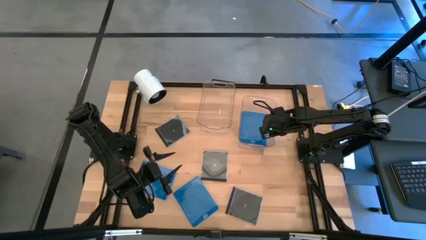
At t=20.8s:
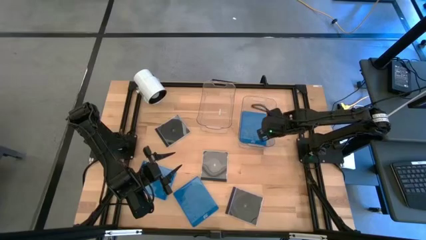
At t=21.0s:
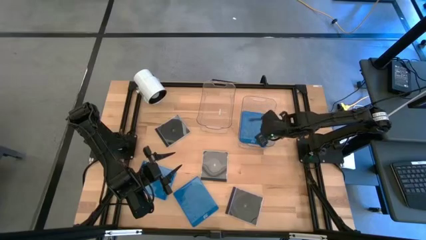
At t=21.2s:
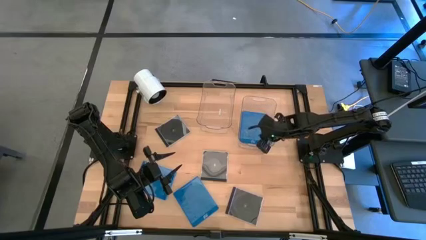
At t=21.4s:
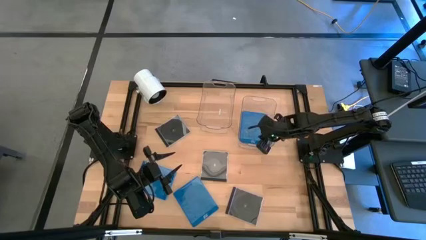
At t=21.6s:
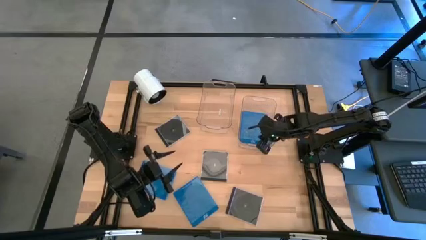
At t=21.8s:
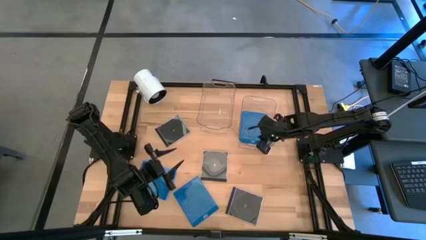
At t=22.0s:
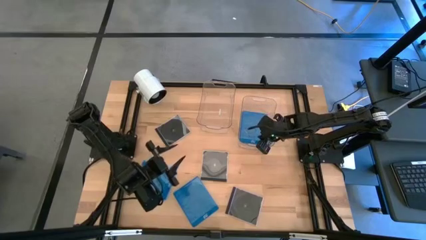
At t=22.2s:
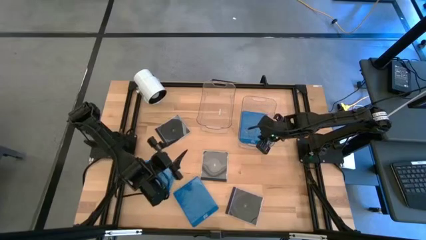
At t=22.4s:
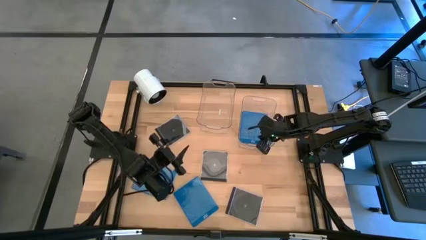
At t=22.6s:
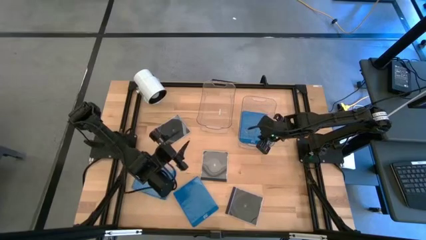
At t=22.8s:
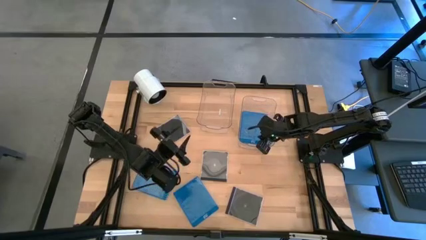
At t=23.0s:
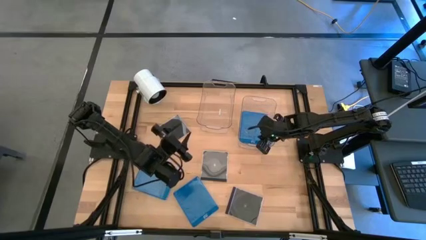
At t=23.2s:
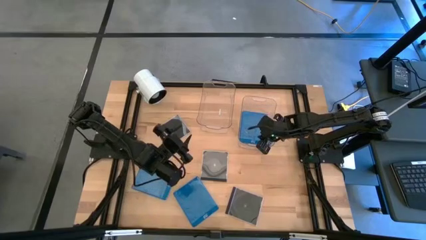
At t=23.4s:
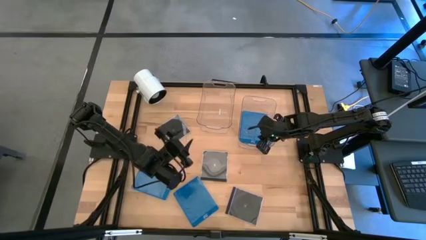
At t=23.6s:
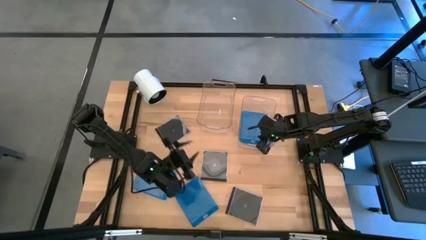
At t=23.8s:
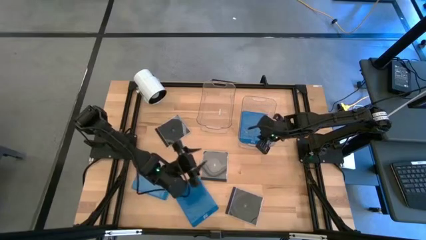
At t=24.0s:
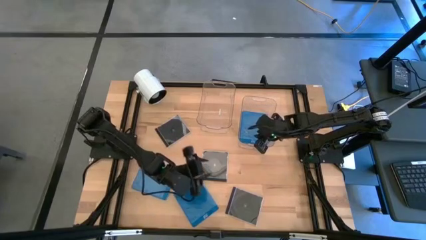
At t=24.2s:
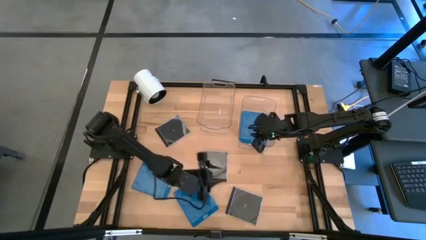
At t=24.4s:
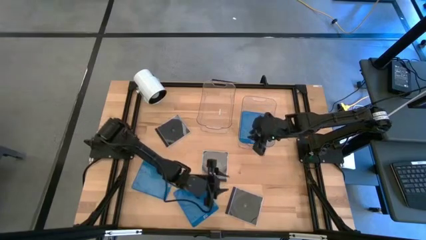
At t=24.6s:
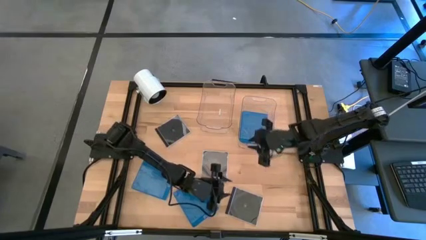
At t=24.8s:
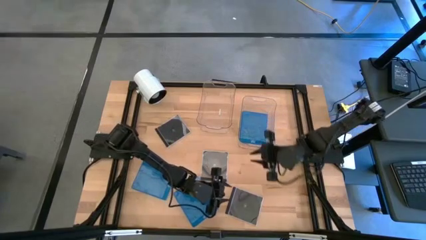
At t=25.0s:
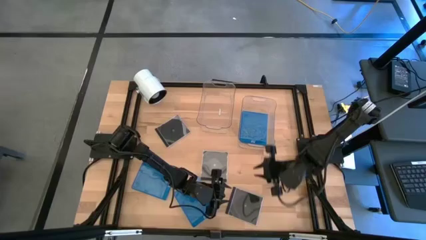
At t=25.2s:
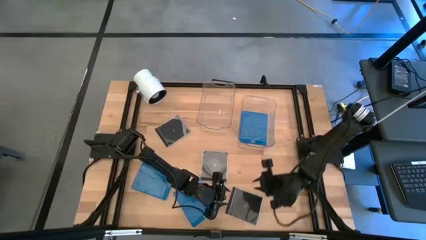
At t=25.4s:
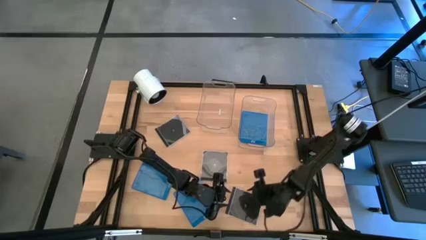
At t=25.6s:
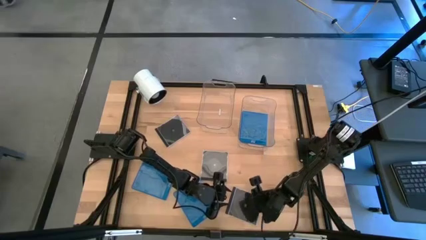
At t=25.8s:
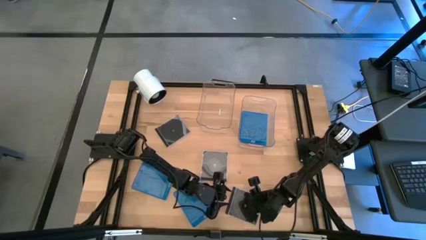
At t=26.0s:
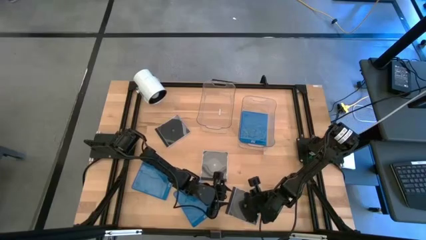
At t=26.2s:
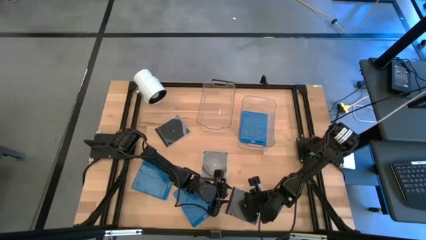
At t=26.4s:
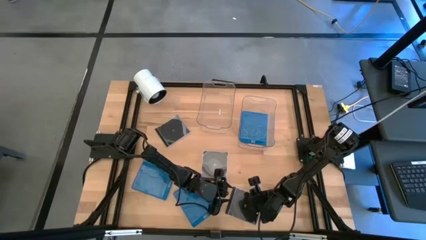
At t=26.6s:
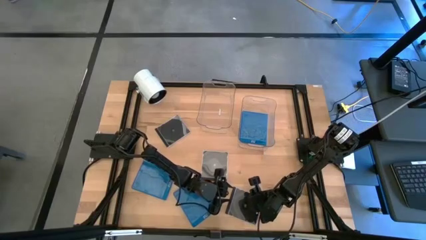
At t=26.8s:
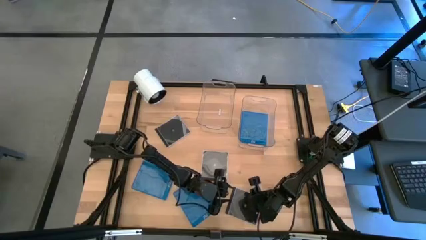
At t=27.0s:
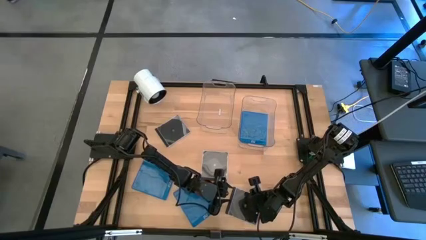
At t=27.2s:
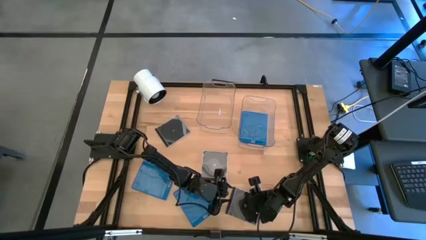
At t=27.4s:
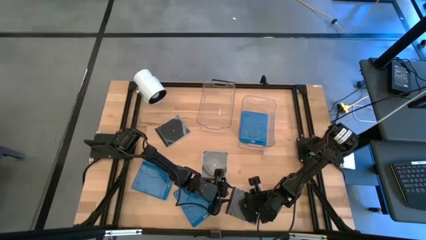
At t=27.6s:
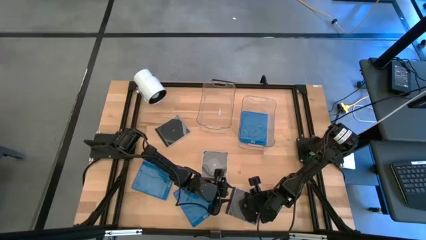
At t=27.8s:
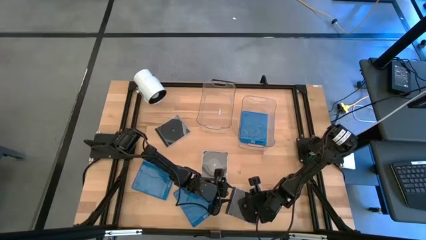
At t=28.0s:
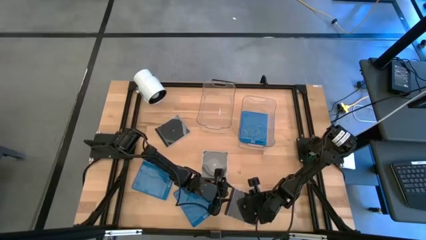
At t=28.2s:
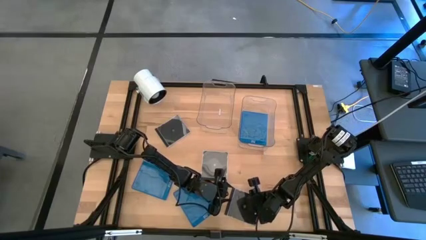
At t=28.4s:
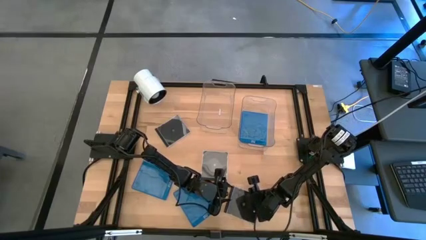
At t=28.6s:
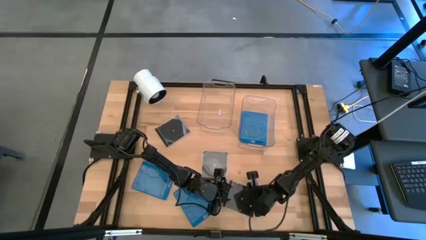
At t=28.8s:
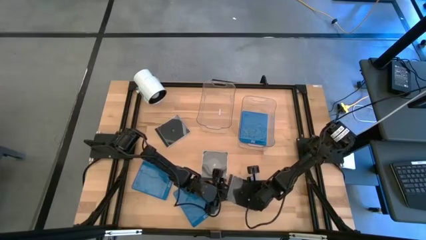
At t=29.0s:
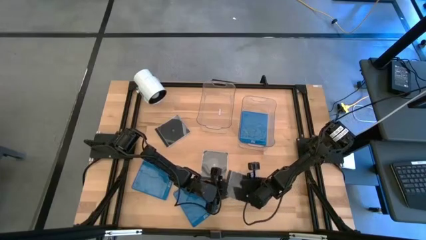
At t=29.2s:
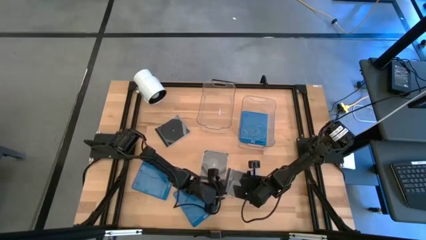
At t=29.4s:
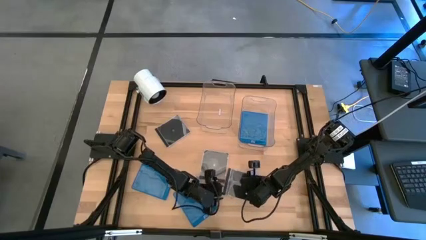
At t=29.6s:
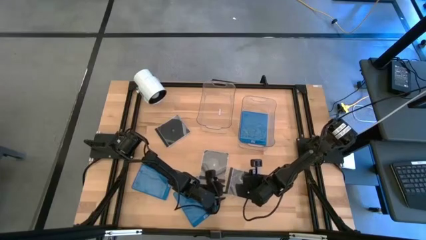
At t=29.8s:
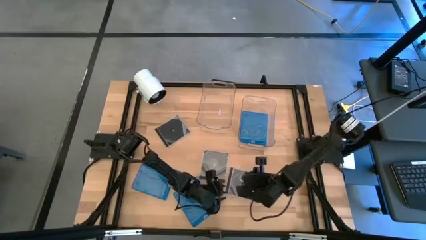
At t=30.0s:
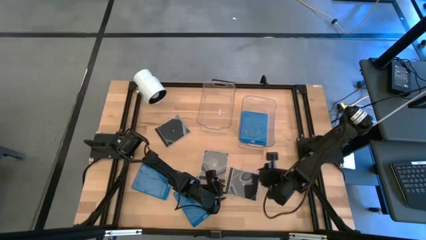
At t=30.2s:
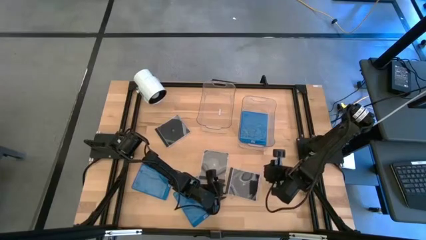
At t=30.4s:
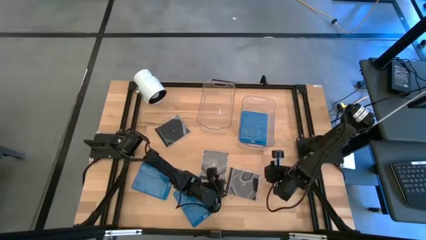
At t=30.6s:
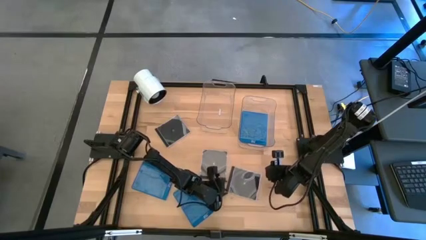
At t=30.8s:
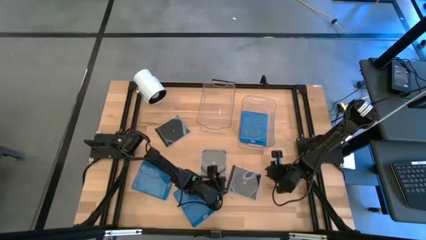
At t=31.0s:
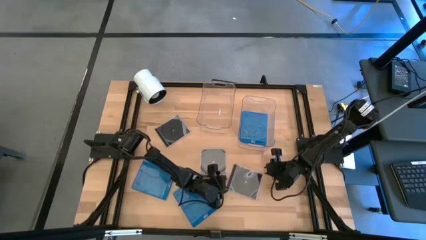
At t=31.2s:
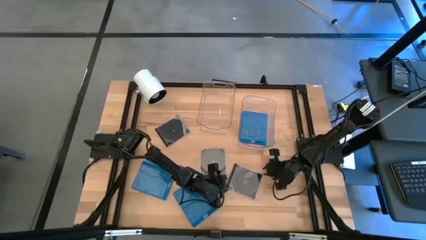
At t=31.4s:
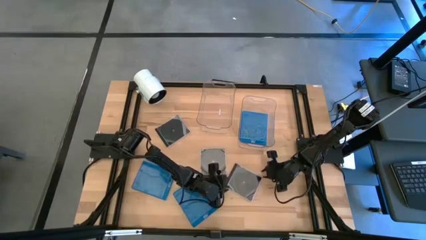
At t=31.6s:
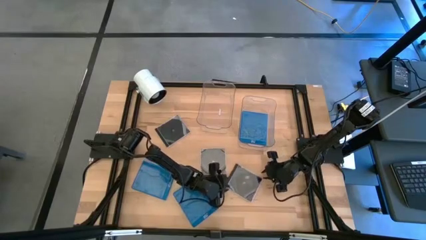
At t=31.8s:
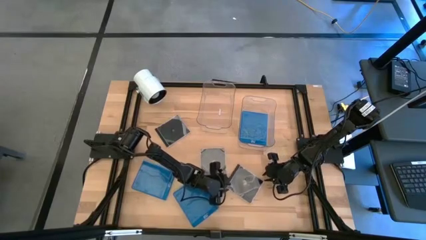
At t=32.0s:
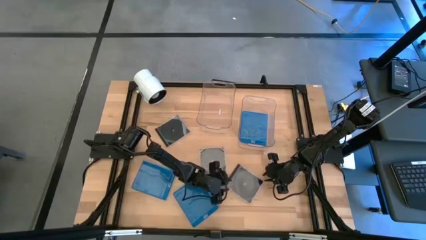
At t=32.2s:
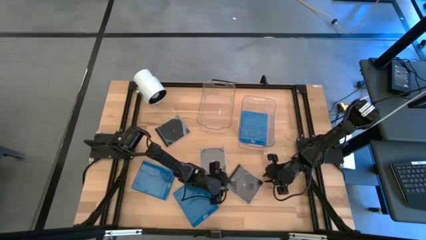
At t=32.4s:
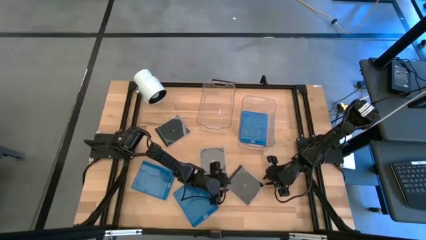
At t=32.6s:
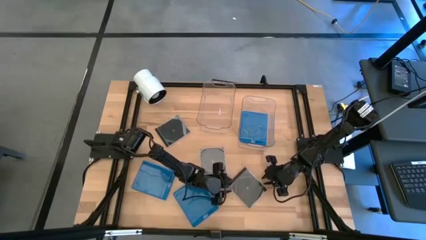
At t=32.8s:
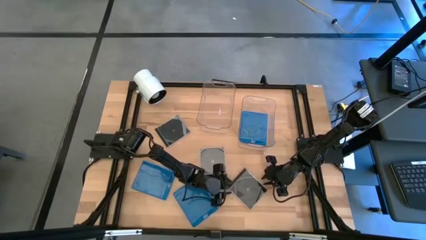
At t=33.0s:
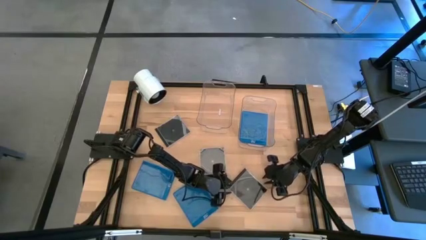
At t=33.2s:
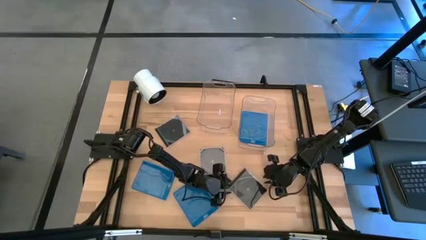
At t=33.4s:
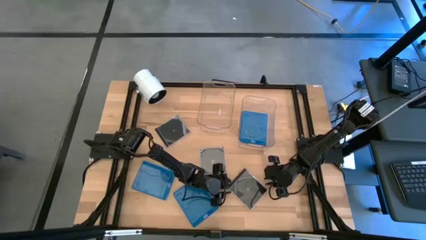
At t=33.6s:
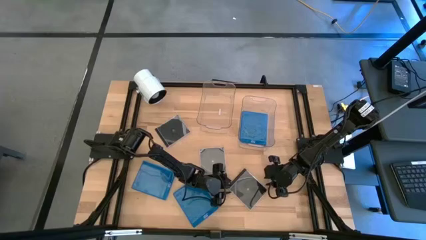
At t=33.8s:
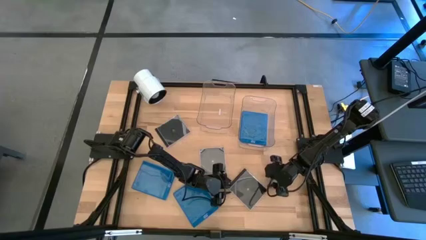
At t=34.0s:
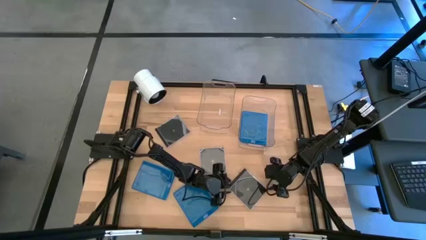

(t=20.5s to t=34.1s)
Task: Pick & place jewel cases by type
Put the bottom black cd case into the left transparent bin
